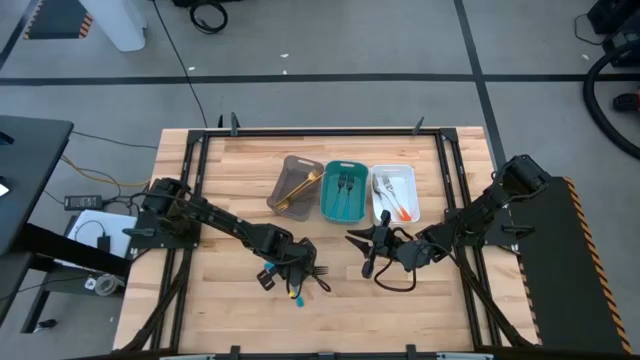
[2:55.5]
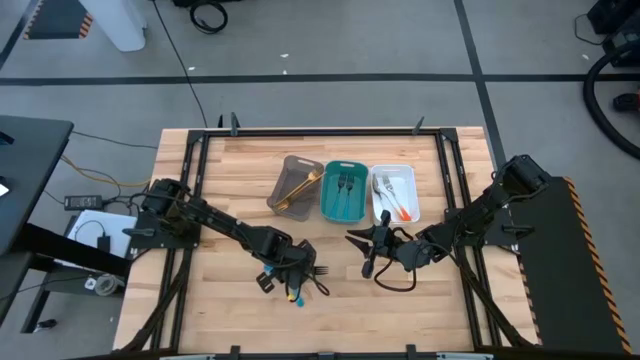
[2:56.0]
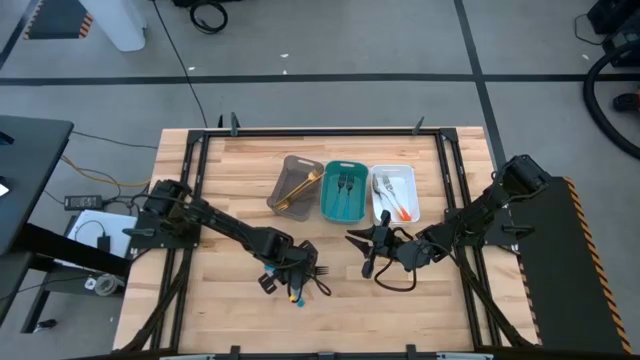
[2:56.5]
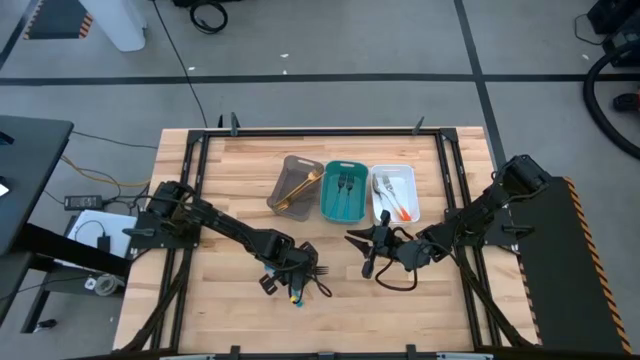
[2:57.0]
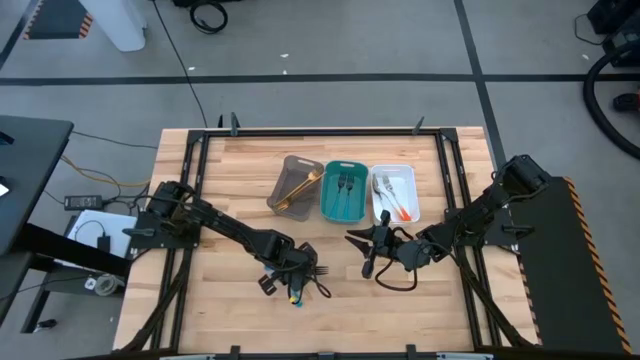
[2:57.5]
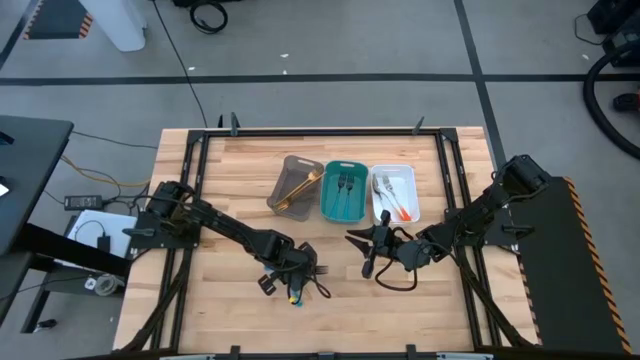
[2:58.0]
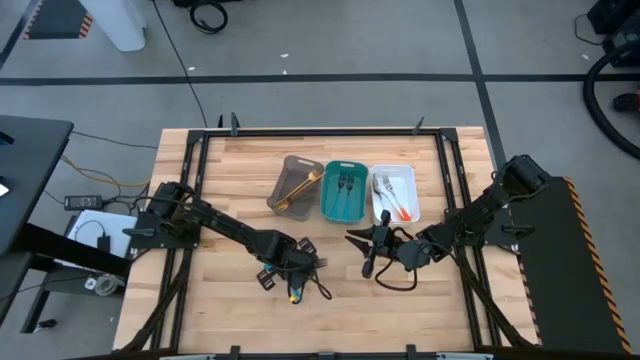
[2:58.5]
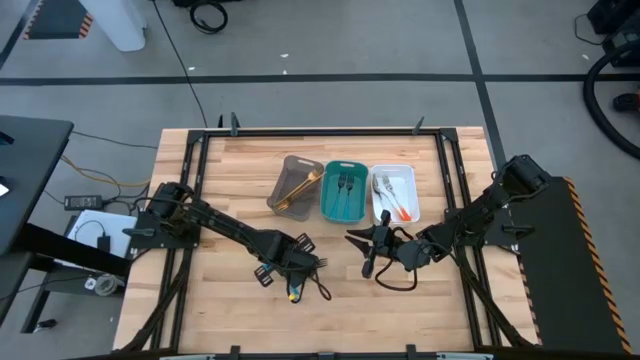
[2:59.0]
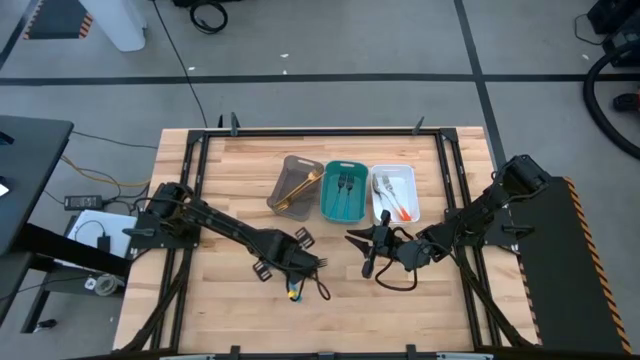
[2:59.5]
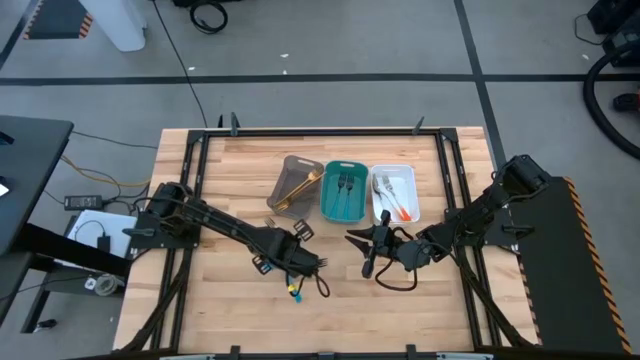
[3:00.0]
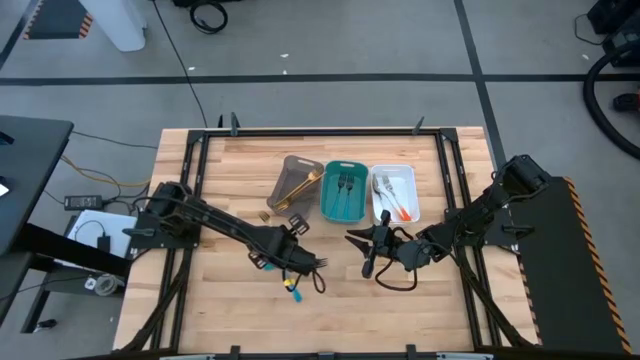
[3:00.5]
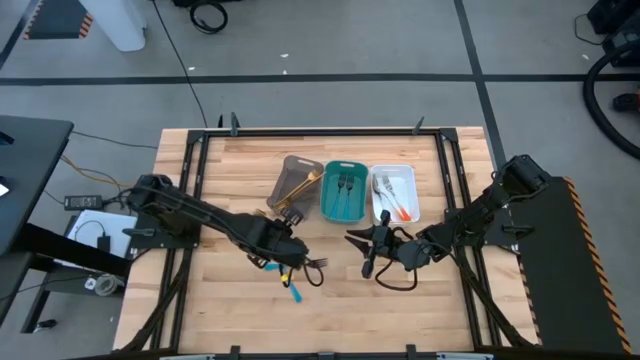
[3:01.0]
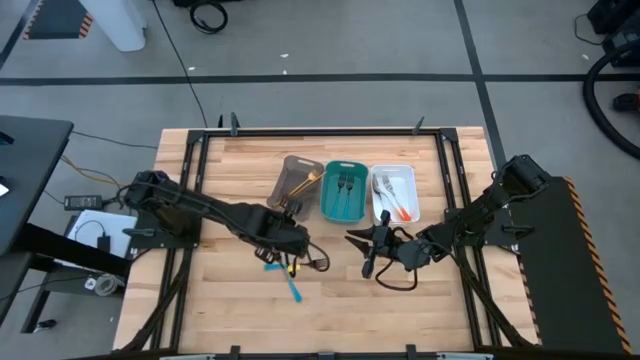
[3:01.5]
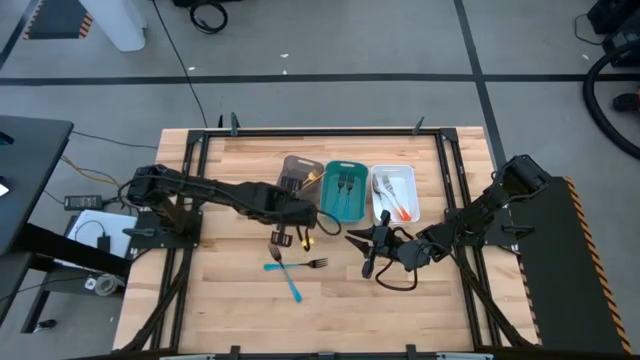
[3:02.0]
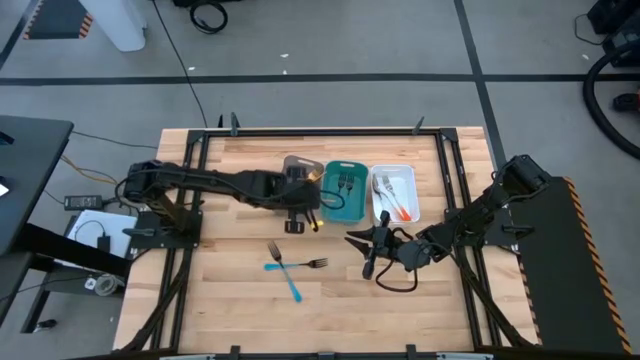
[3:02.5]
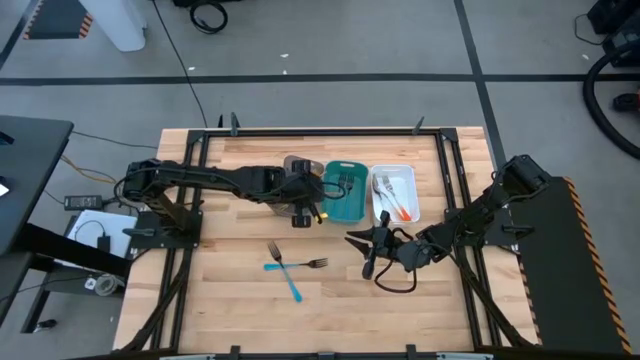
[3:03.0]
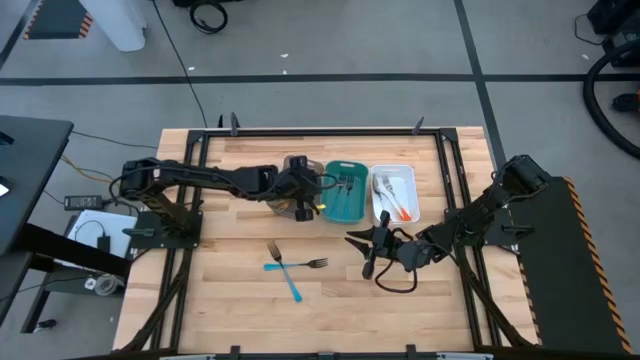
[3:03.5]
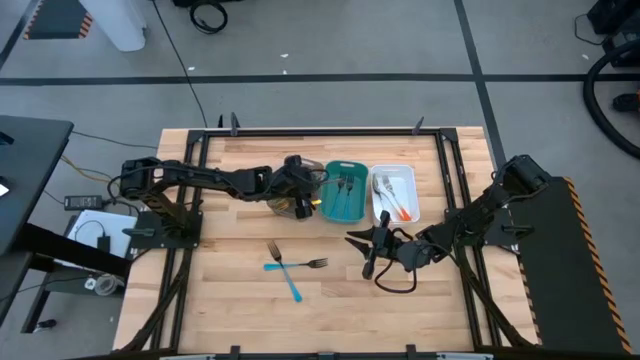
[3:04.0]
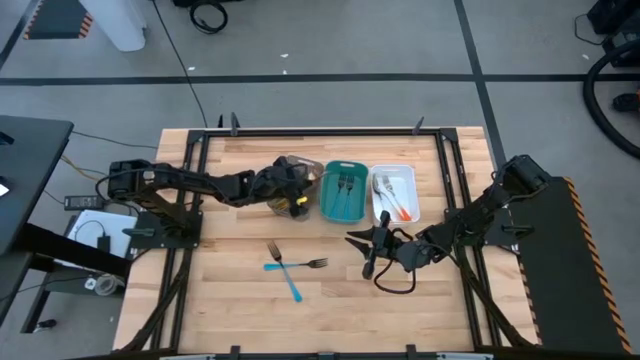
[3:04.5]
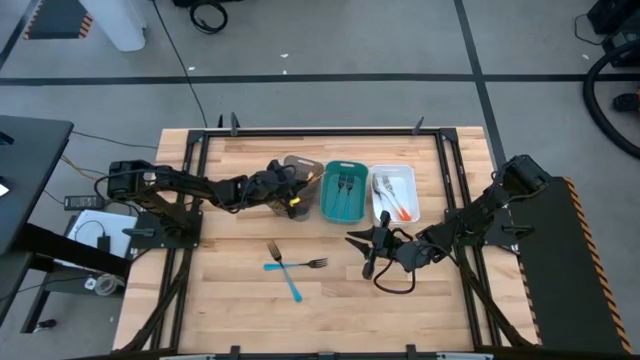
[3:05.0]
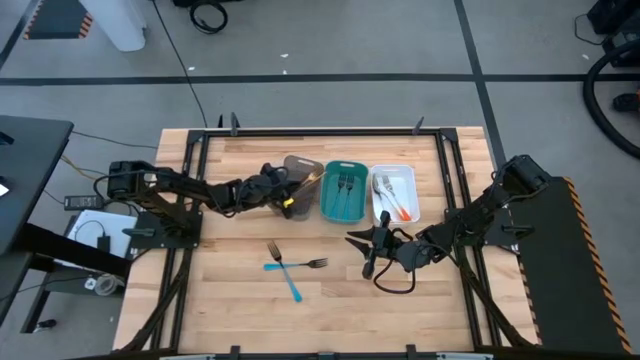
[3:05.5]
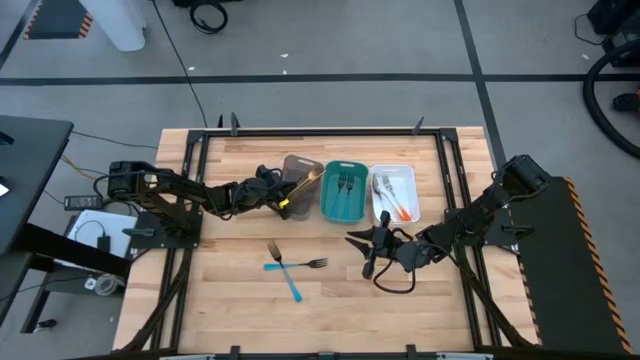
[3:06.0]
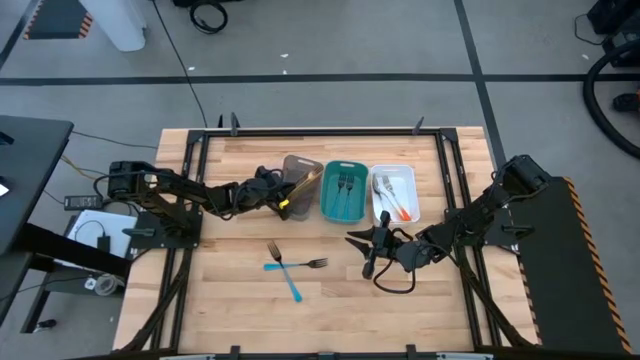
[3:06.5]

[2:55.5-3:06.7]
Task: Sort silverware by color (type)
Put the gold fork into the black bin

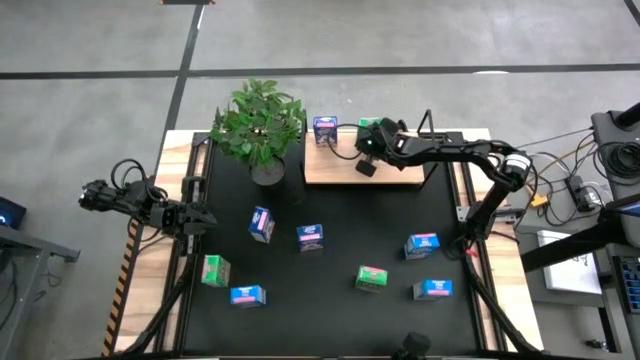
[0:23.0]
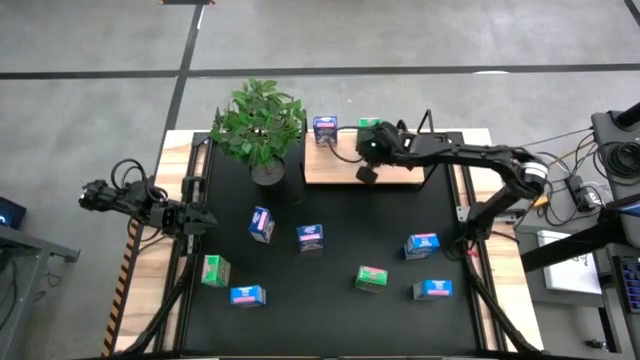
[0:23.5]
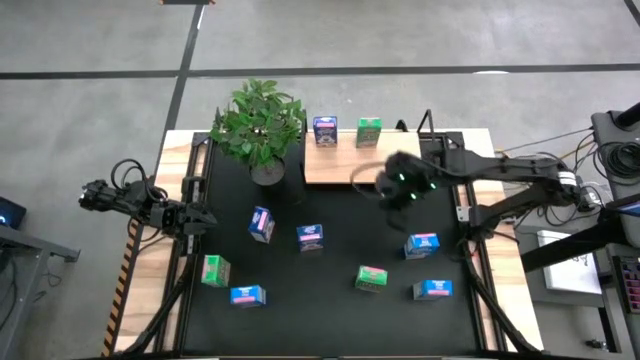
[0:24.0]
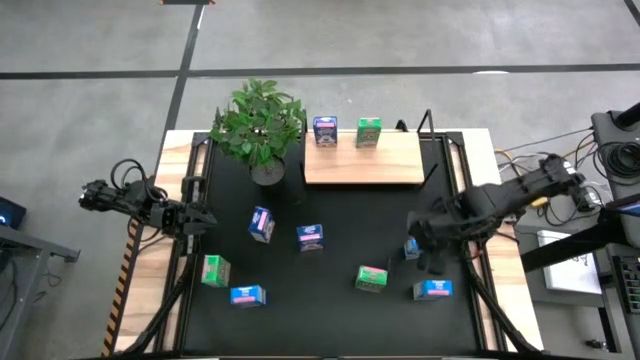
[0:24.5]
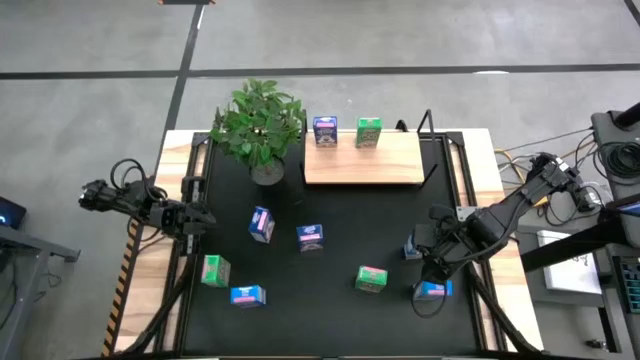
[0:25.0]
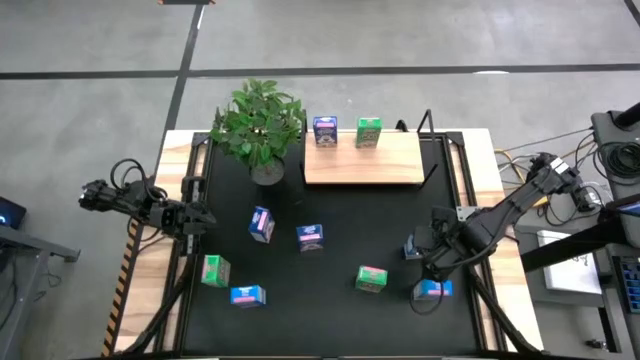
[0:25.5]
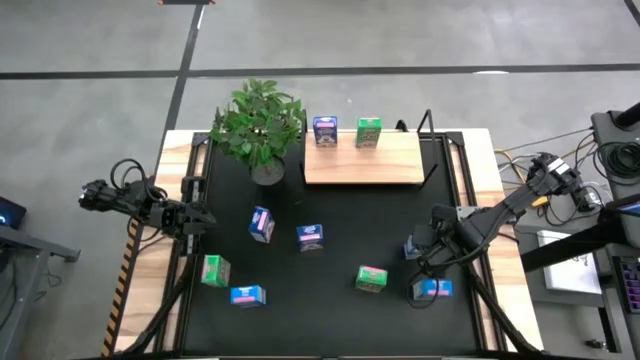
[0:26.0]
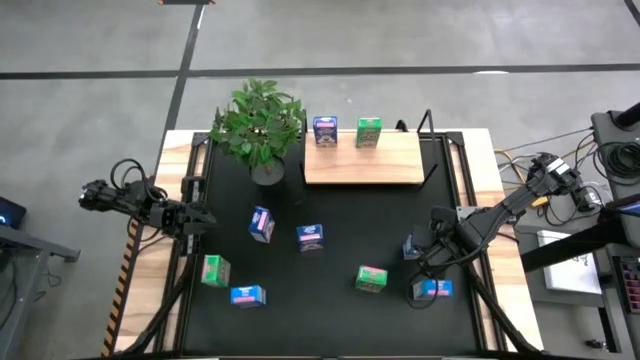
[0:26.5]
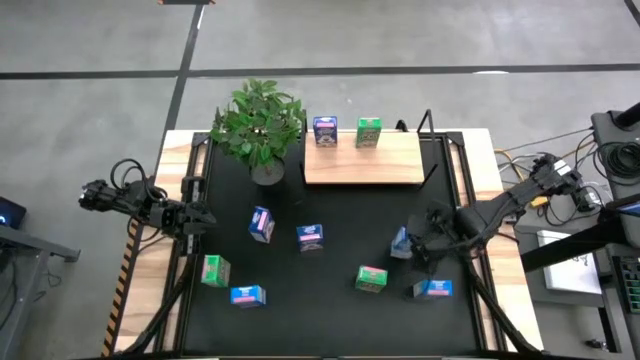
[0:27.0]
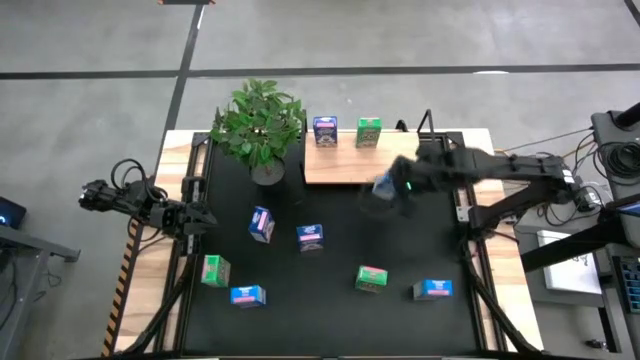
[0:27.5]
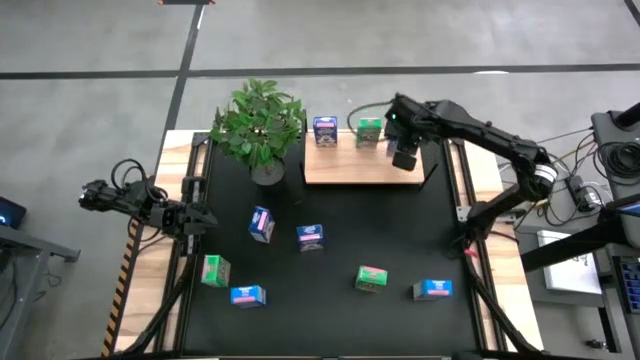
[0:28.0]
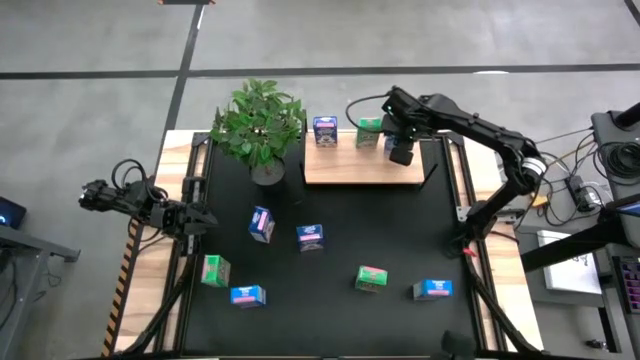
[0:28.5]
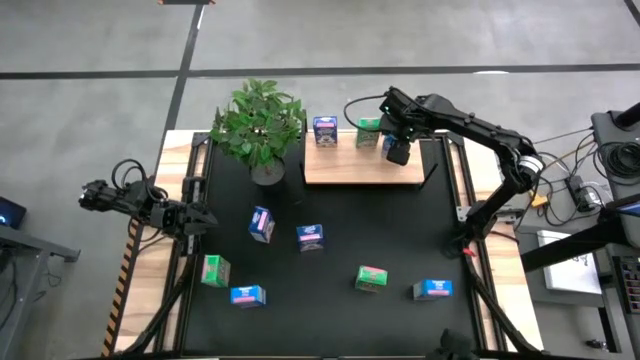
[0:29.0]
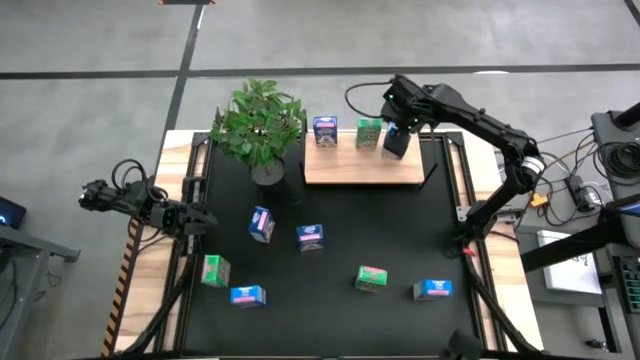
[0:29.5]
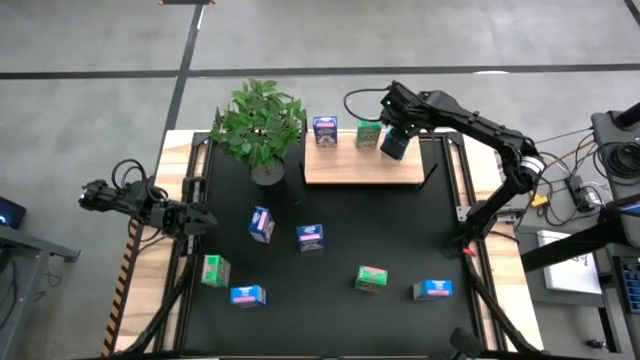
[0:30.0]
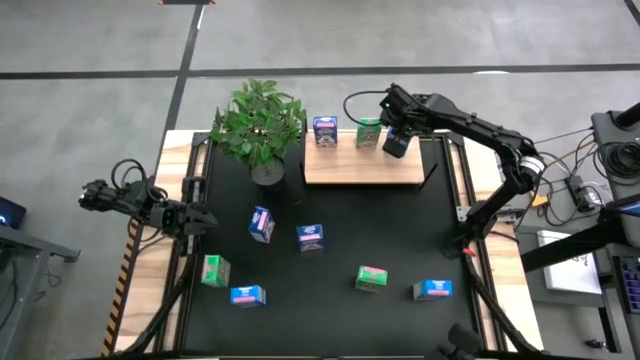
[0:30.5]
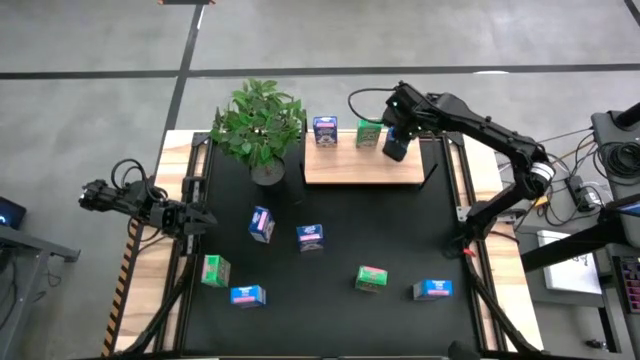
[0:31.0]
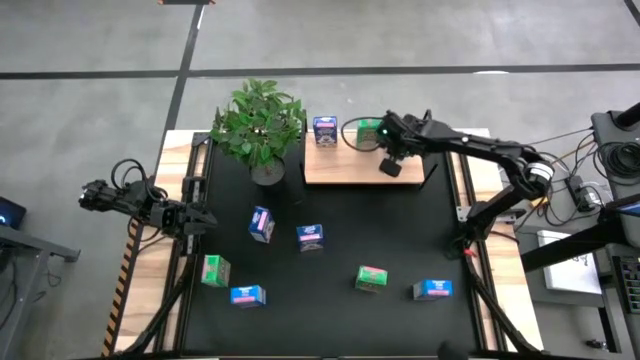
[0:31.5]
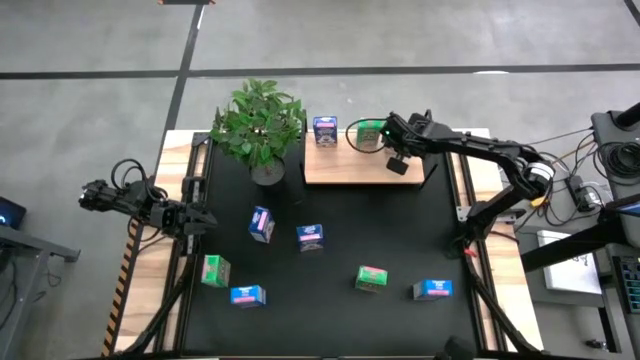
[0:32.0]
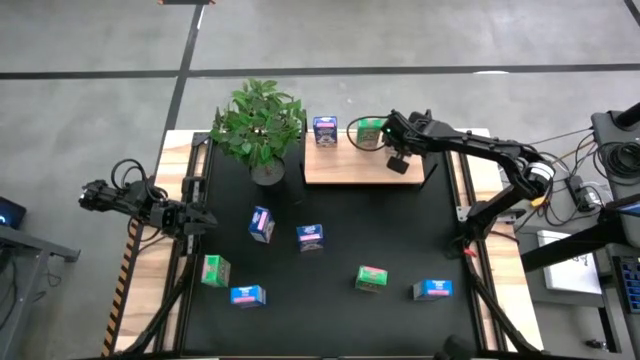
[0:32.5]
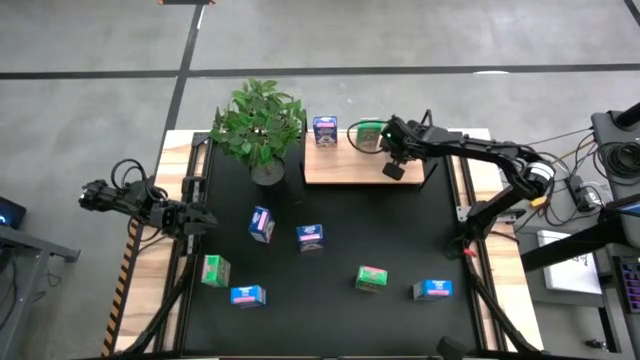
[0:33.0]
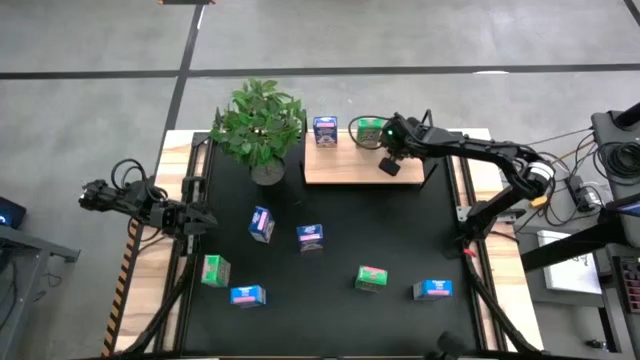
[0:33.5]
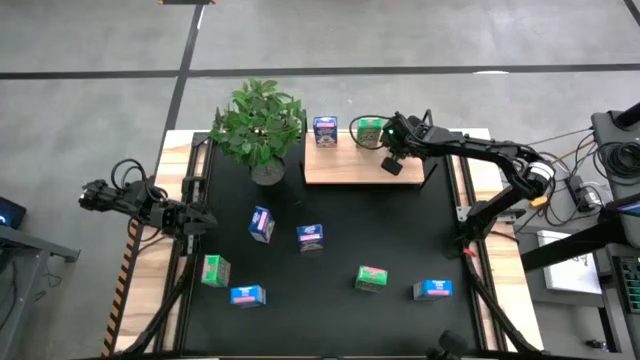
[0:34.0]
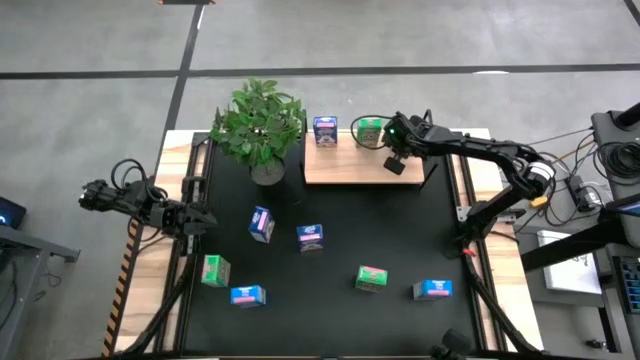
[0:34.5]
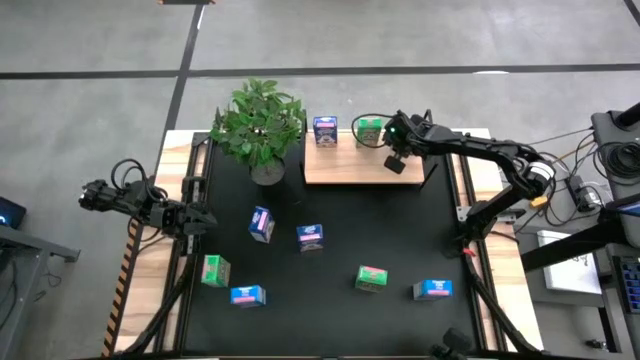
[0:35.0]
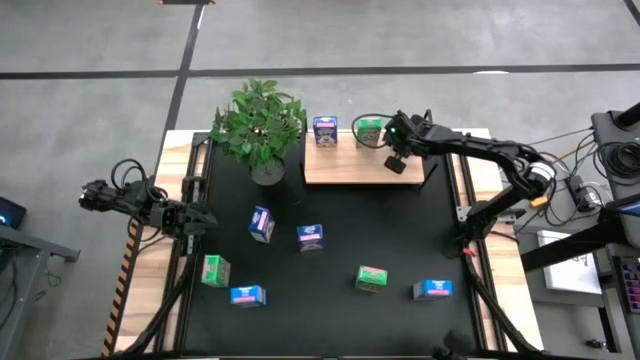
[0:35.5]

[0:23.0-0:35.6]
Task: Stack cereal on shelf
Put the top right light blue cereal box on the shelf
